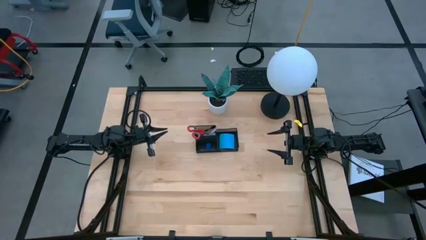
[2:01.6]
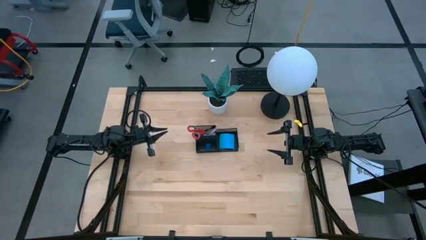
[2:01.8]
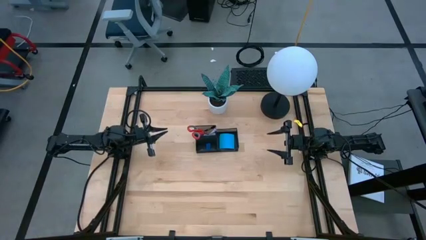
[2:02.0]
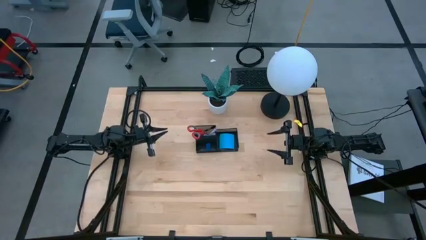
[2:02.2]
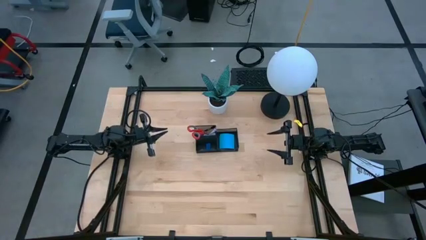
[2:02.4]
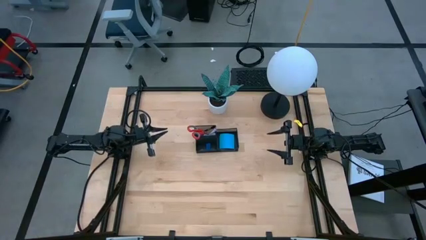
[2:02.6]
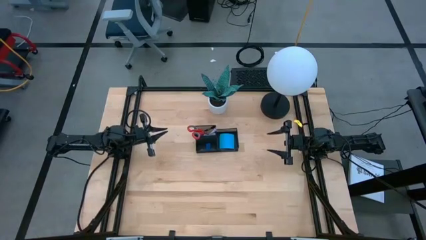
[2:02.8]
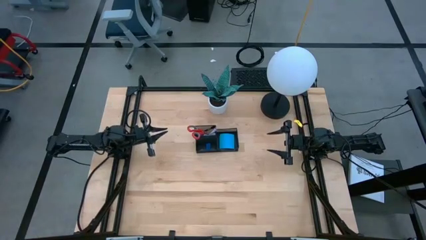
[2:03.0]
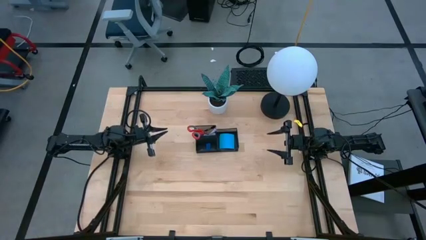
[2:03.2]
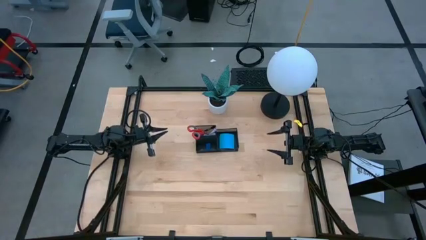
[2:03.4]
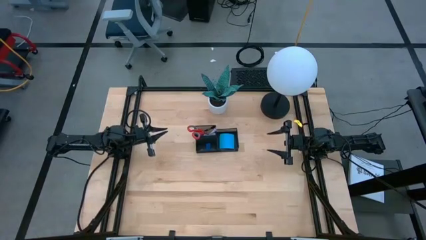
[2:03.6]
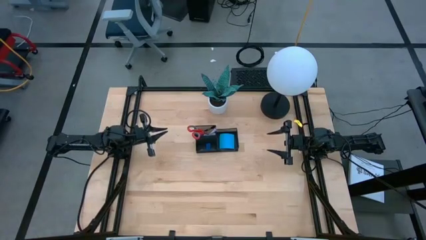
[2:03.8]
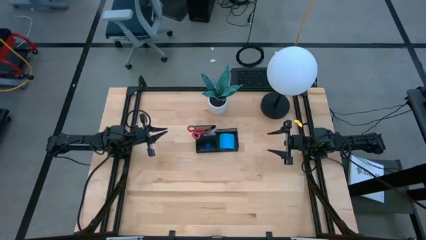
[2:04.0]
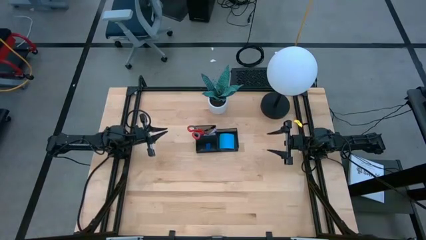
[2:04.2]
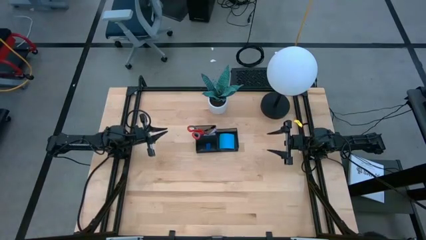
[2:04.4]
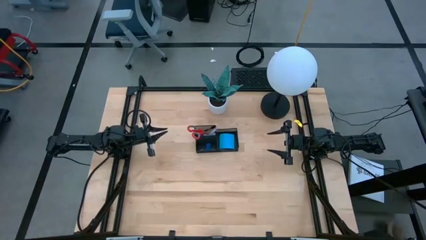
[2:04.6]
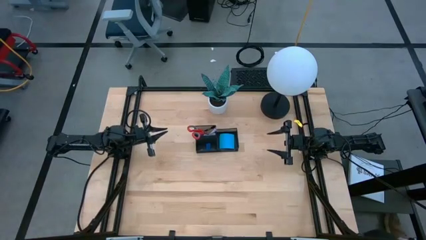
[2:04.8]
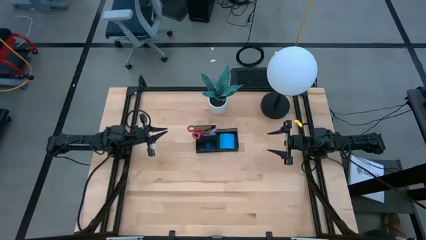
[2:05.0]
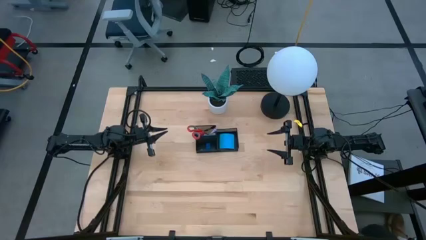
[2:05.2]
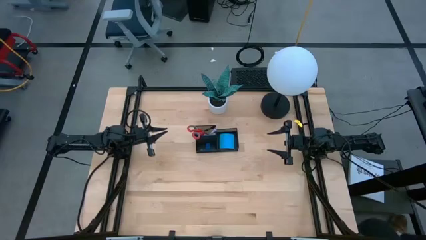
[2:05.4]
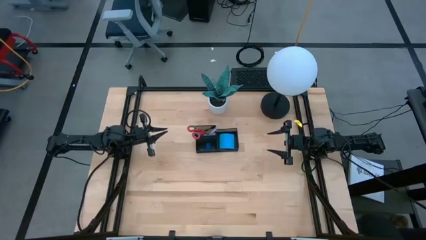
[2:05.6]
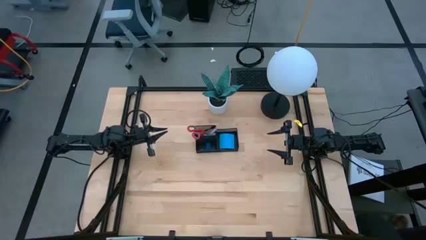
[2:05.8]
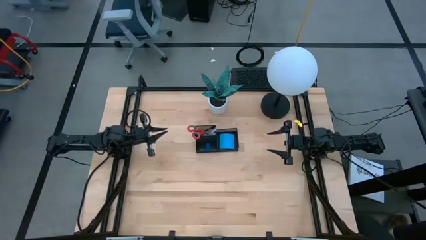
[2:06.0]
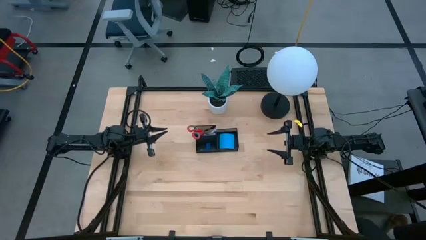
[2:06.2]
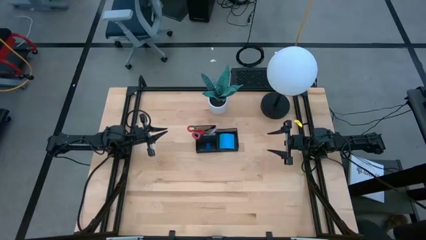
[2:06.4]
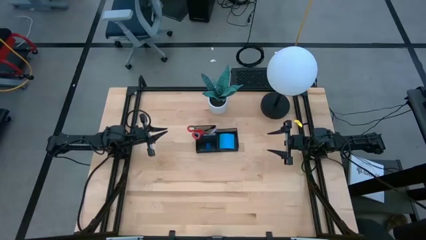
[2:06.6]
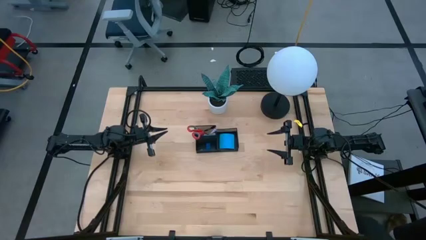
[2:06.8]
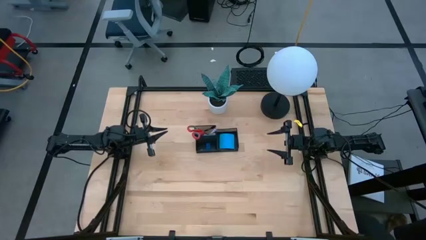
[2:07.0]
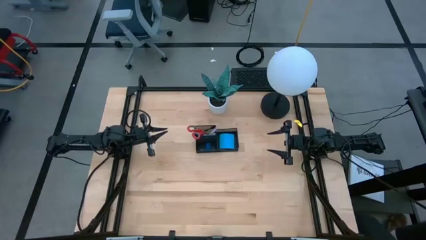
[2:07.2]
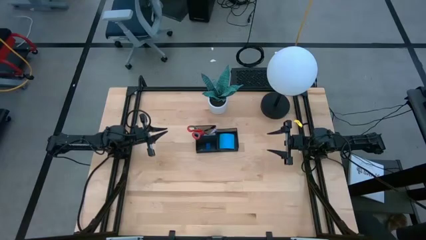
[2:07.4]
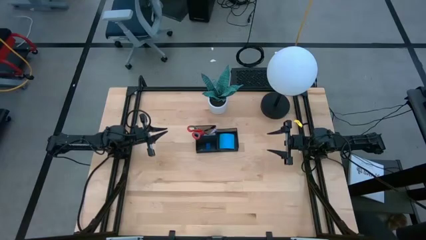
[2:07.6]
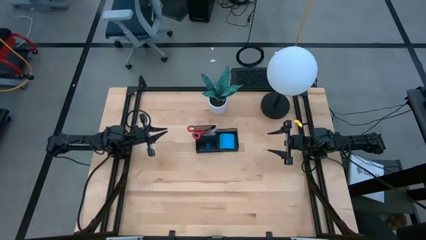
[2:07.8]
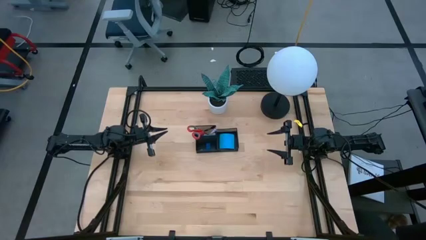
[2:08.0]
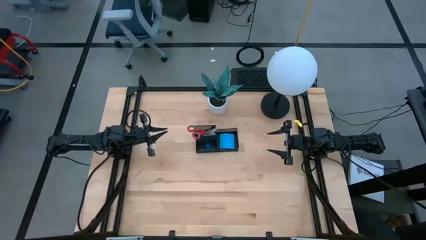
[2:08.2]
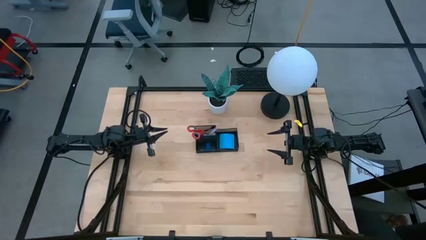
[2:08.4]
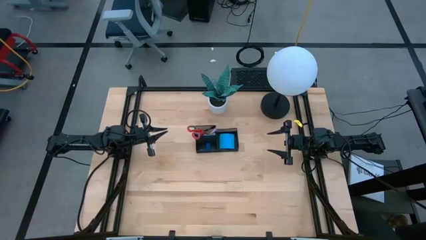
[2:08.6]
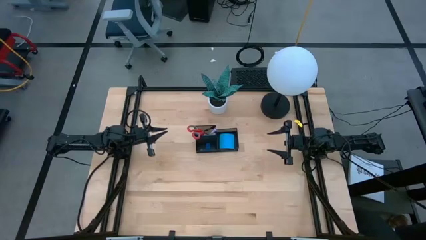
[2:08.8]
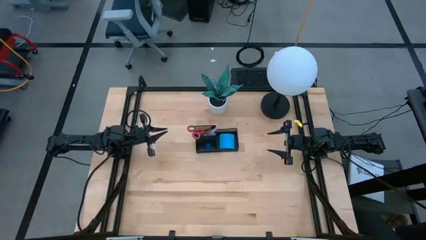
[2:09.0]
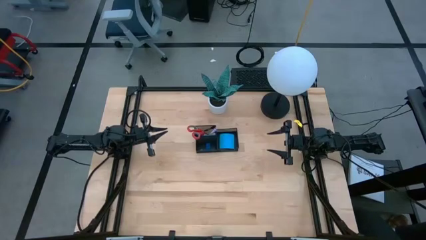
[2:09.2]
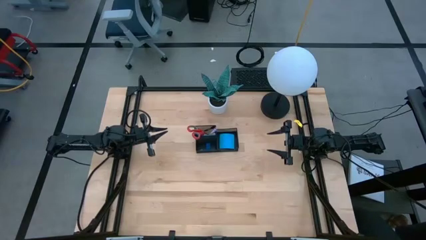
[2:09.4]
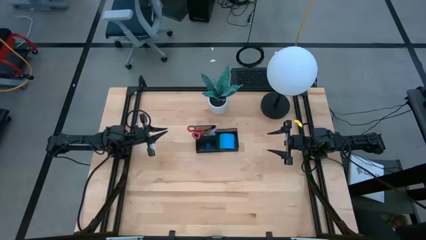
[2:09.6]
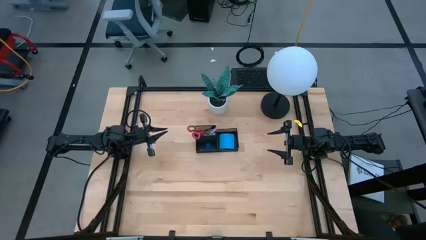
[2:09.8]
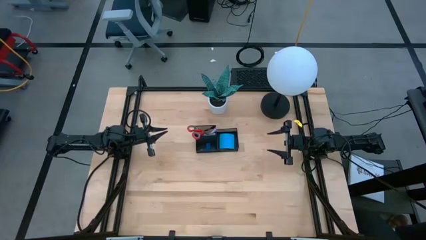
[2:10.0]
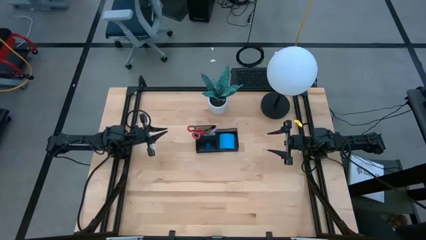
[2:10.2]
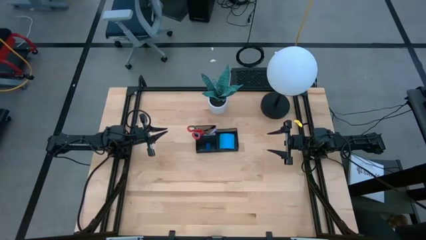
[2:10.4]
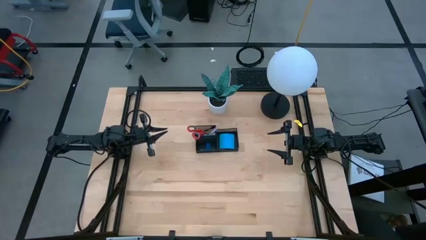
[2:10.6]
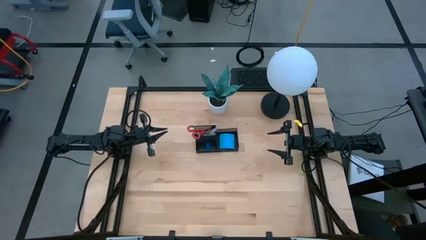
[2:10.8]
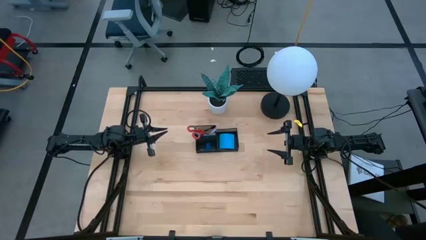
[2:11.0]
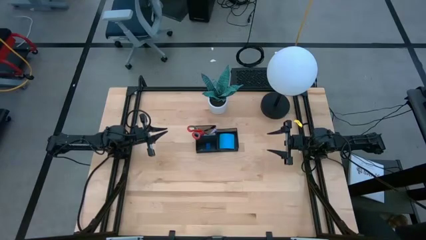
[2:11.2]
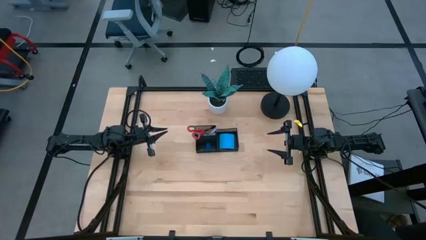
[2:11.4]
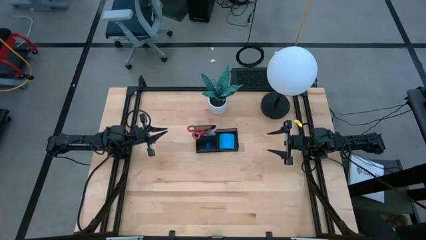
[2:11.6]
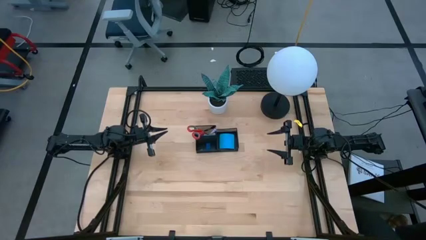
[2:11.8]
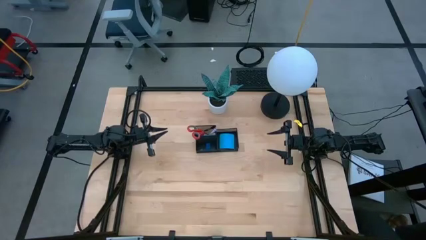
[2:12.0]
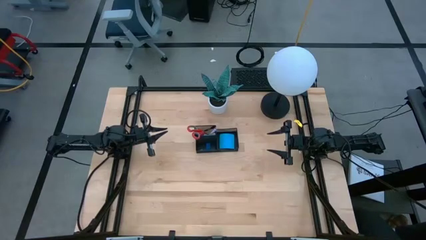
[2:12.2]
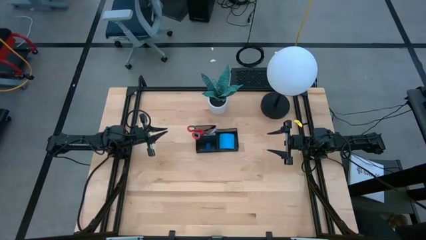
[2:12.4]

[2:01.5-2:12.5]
Task: Pick and place office supplies into organizer
Return to Home Position
